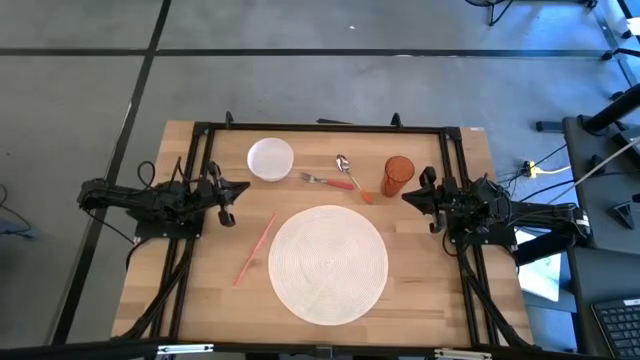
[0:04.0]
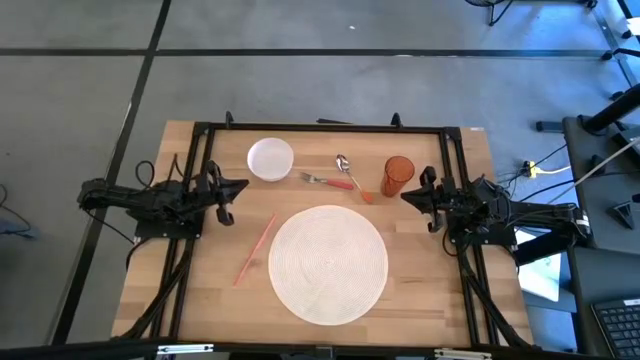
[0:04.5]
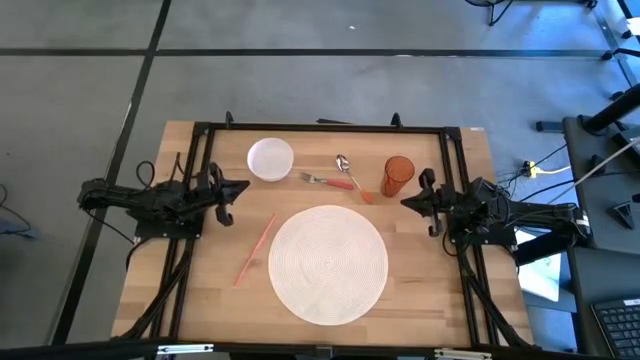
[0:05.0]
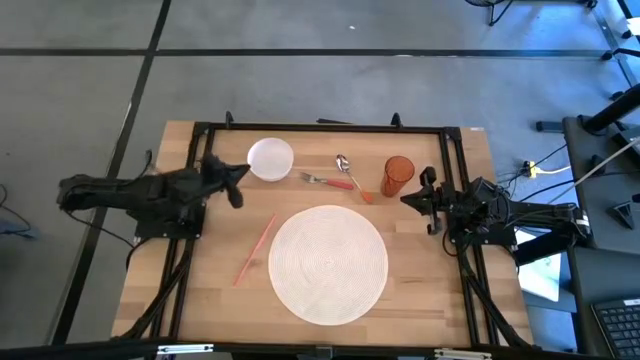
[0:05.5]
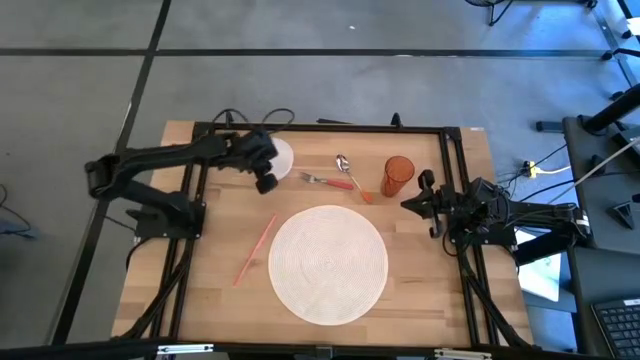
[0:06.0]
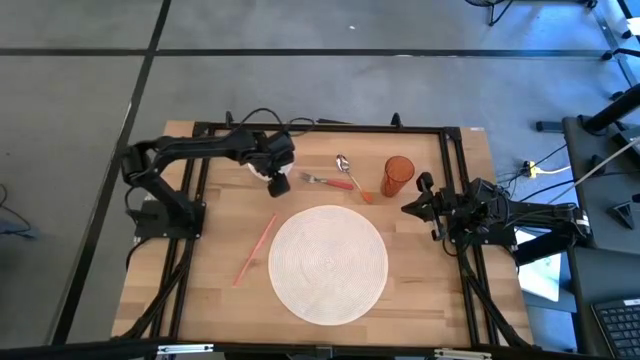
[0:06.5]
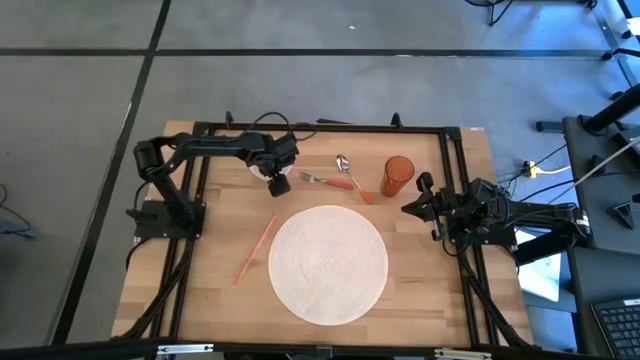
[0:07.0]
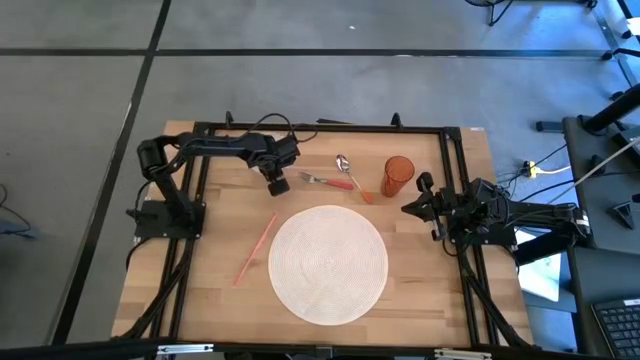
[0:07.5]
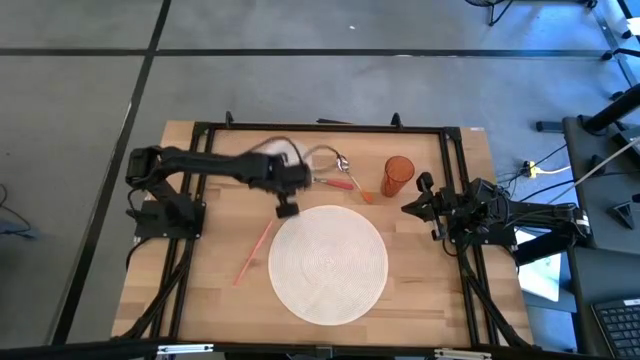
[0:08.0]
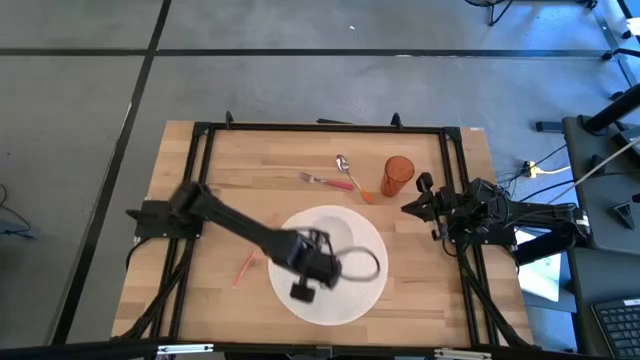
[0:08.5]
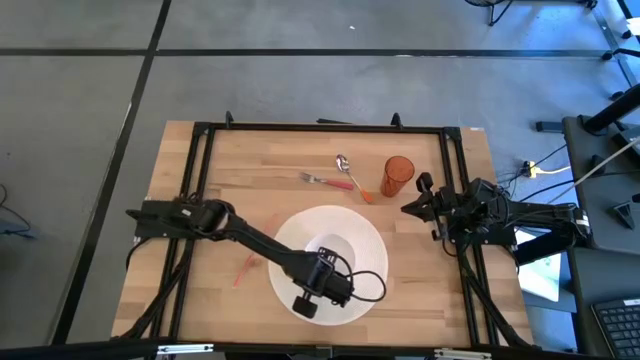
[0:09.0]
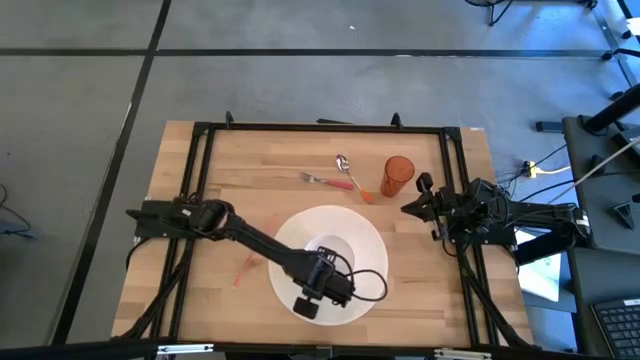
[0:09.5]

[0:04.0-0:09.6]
Task: Pick & Place Utensil
Put the white bowl on the white mat

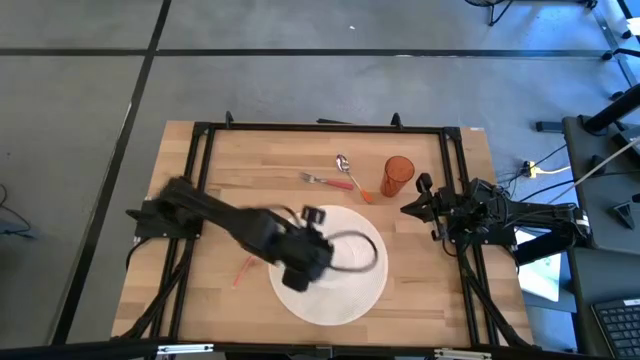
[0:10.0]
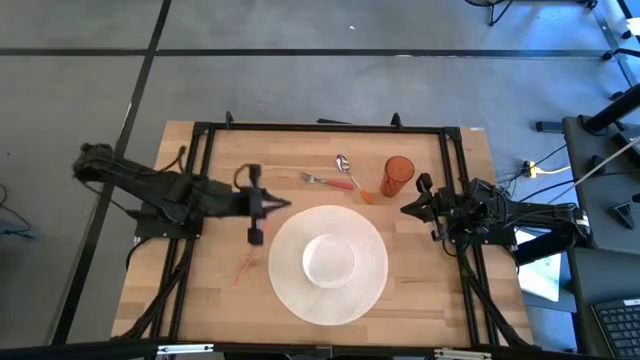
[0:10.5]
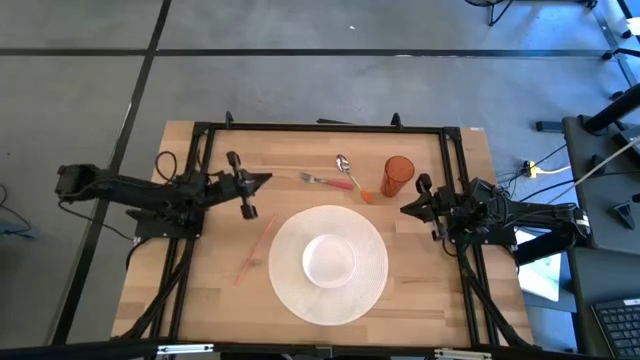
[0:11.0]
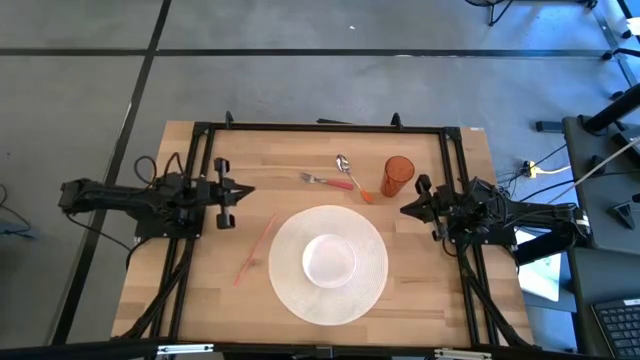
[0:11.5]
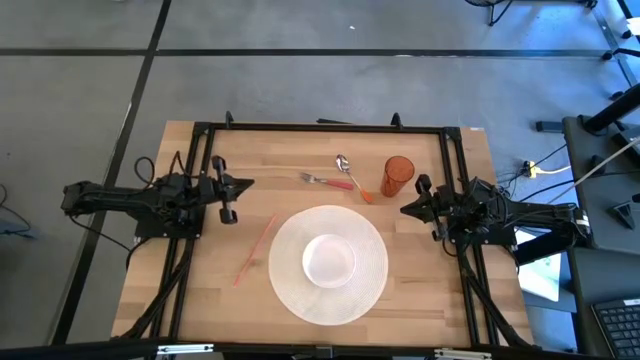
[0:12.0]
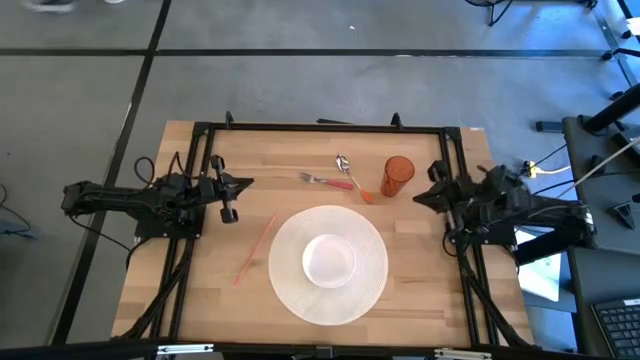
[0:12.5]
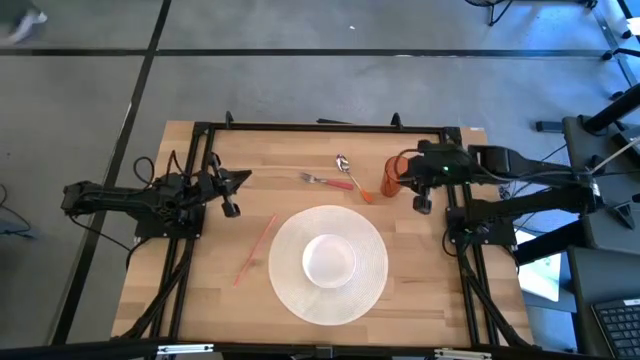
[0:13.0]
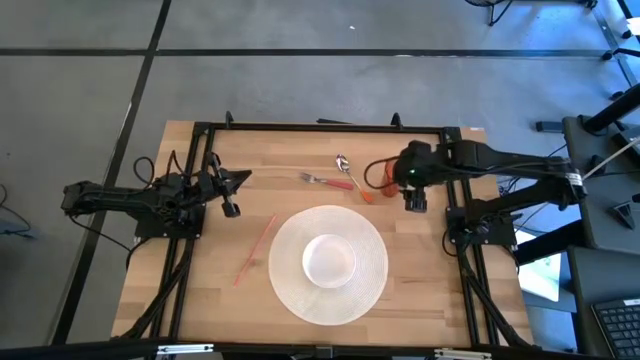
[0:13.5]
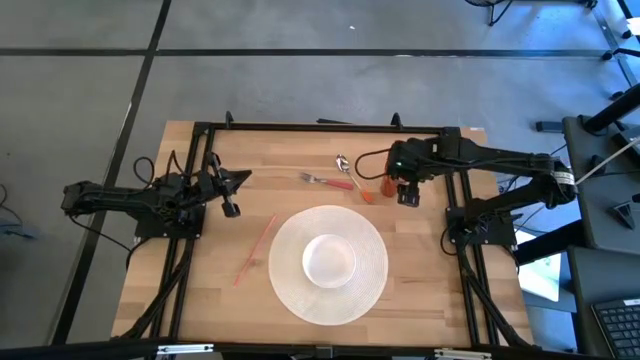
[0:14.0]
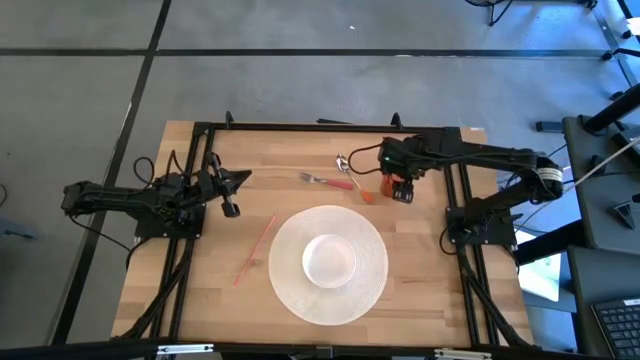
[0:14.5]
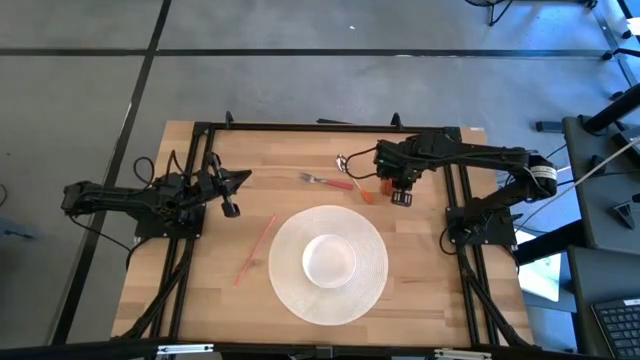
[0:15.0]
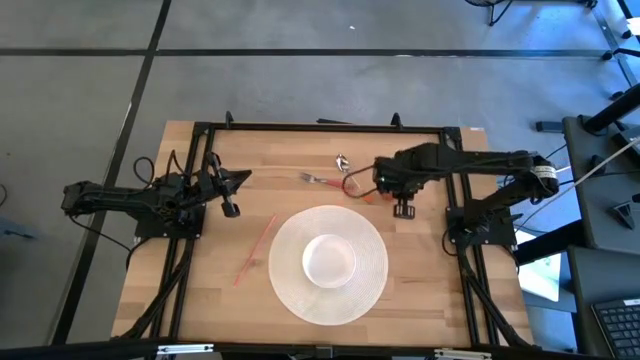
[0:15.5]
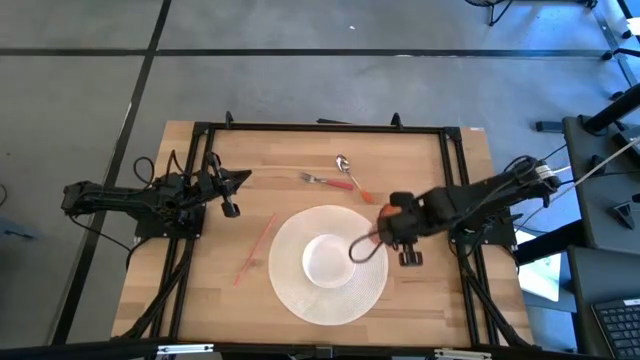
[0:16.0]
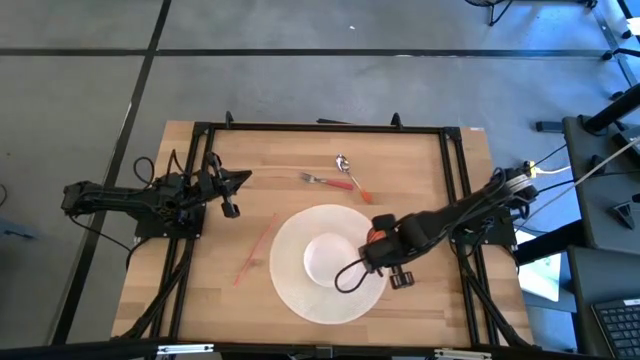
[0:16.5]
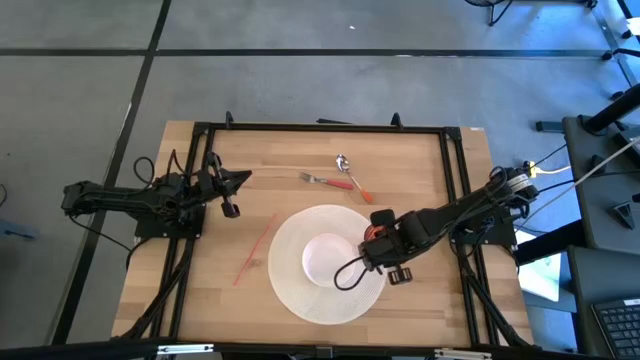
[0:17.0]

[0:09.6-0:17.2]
Put the orange cup on the white mat to the right of the white bowl

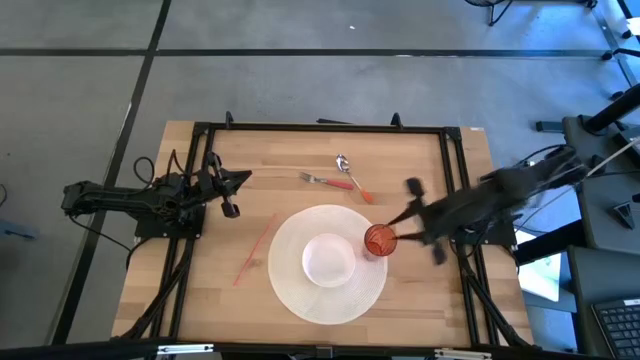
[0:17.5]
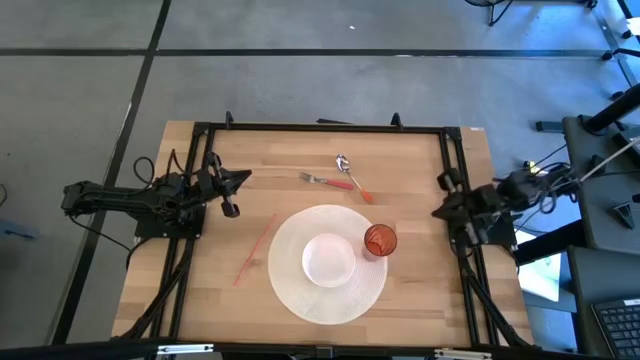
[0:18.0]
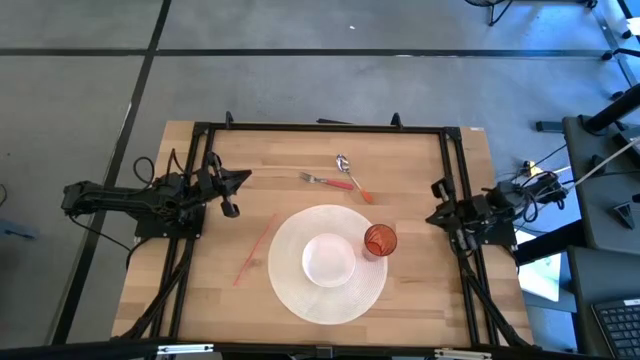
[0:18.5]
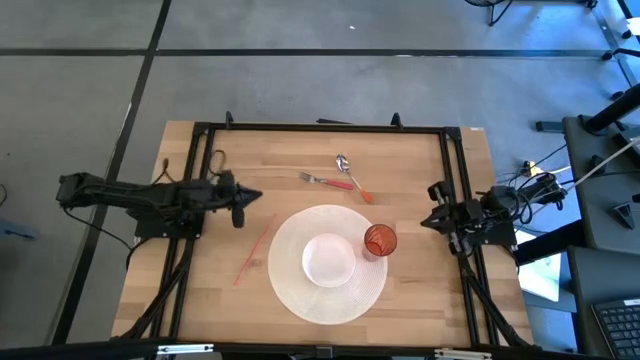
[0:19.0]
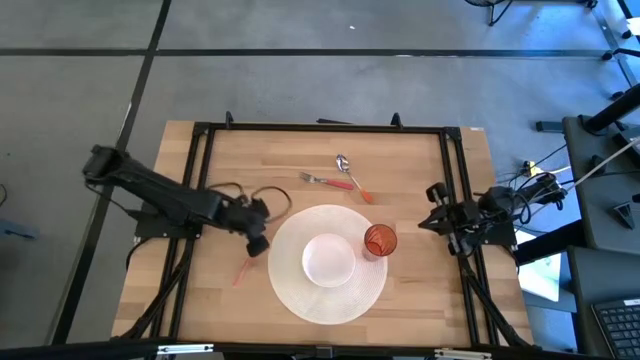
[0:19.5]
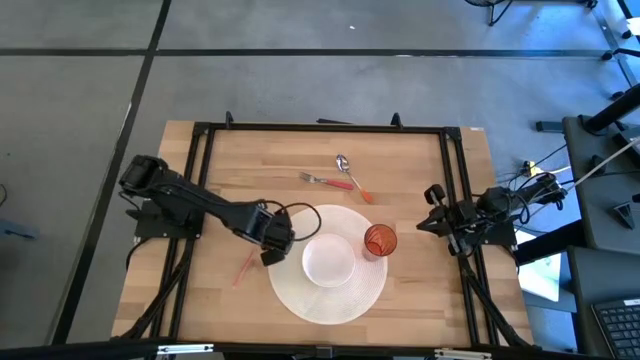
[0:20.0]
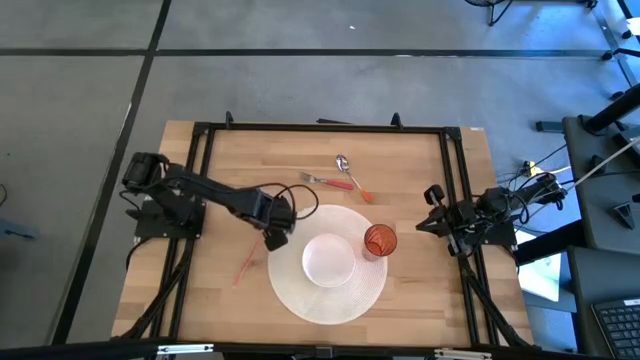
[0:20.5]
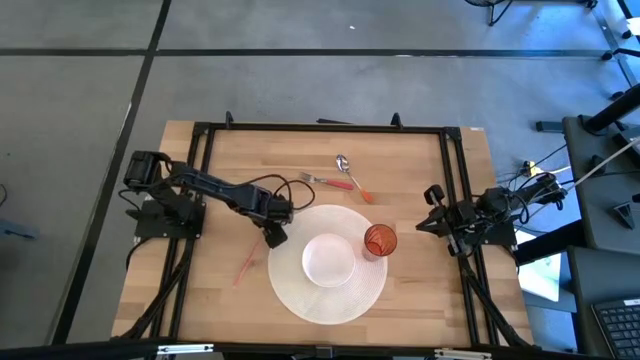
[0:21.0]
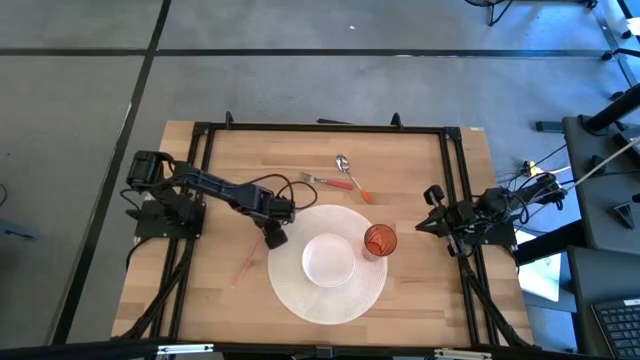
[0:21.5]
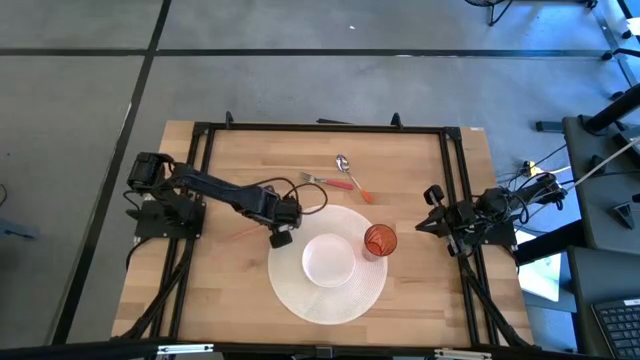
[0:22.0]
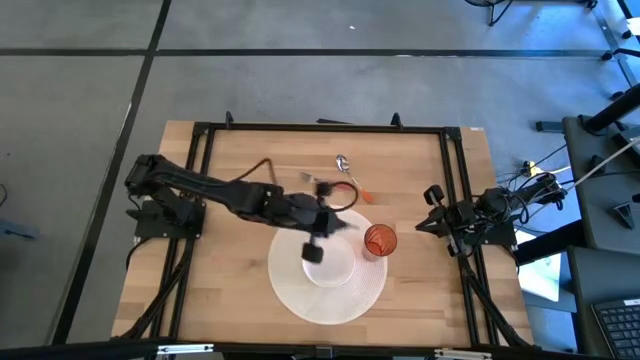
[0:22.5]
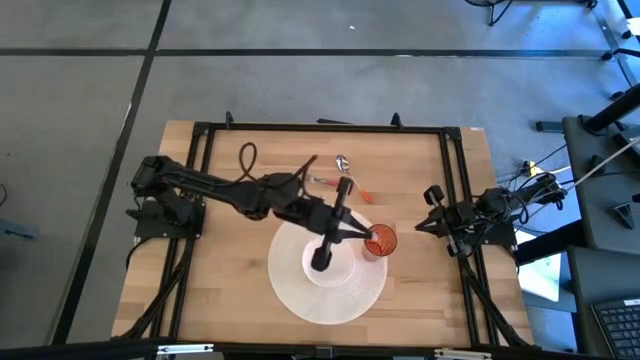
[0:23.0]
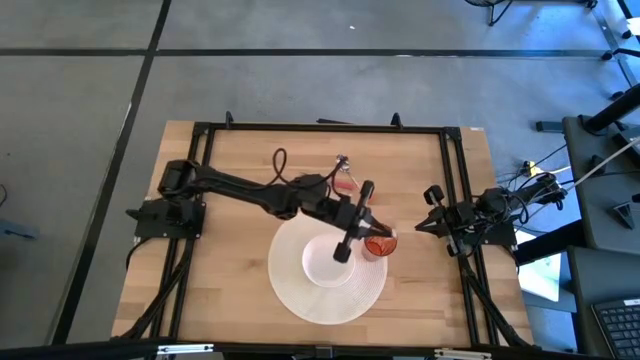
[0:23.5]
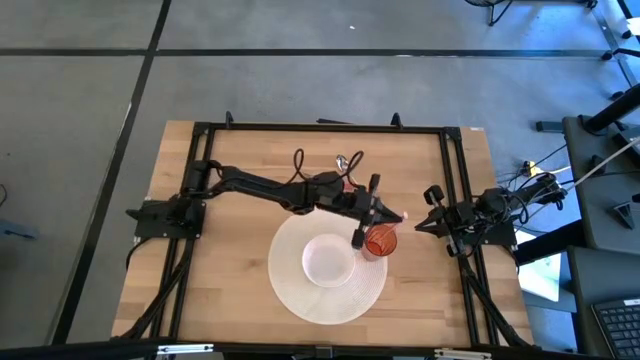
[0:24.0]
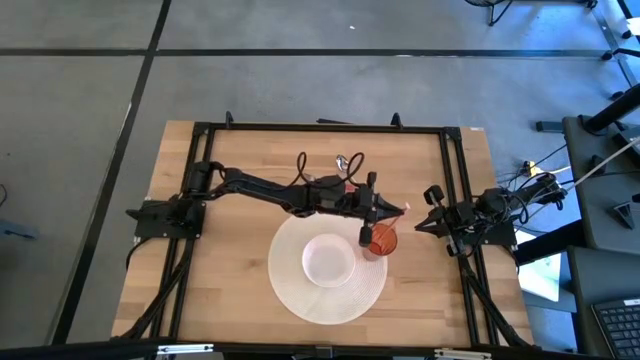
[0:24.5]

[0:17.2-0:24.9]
Put the orange straw into the orange cup on the white mat
